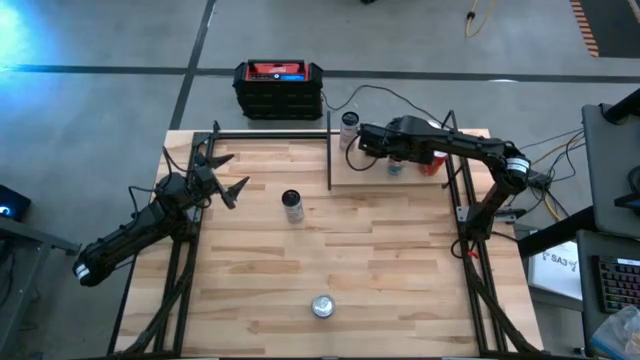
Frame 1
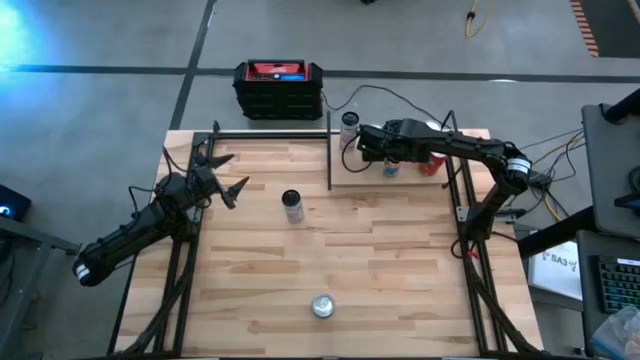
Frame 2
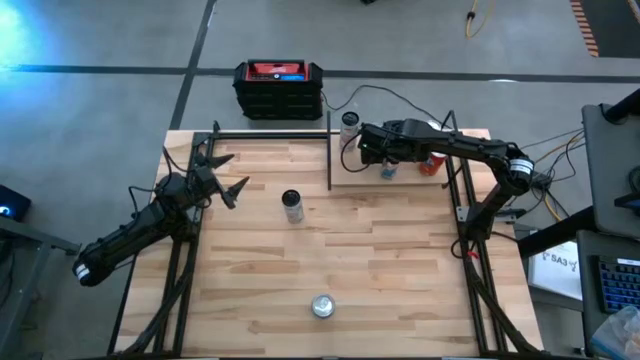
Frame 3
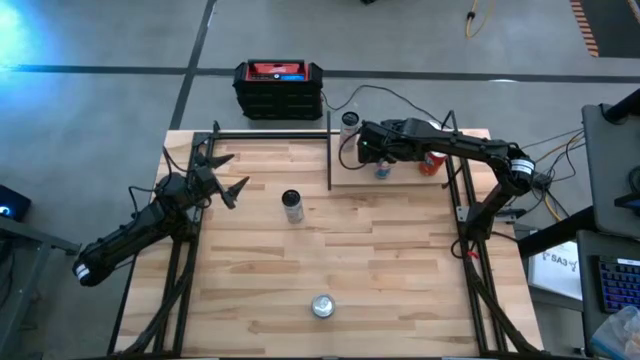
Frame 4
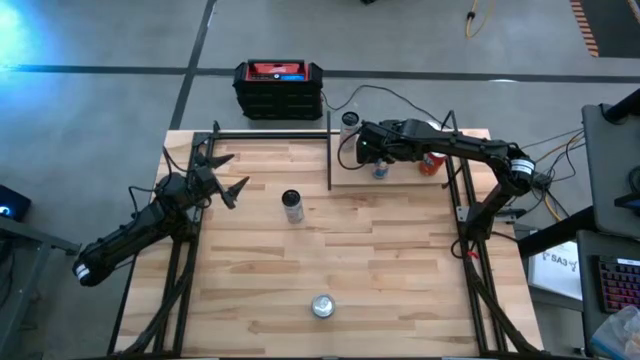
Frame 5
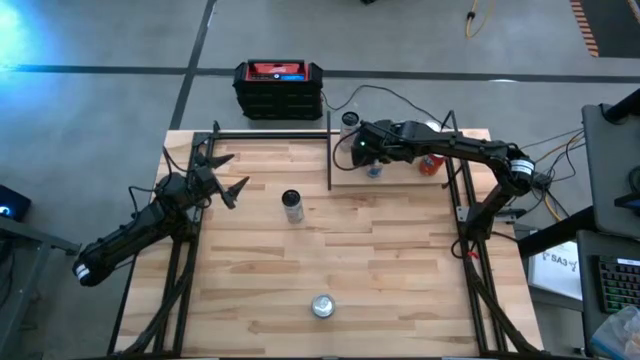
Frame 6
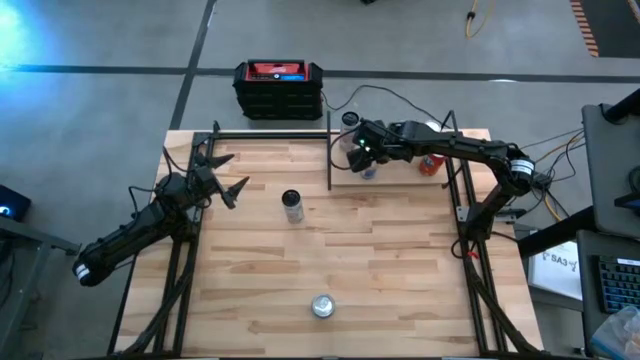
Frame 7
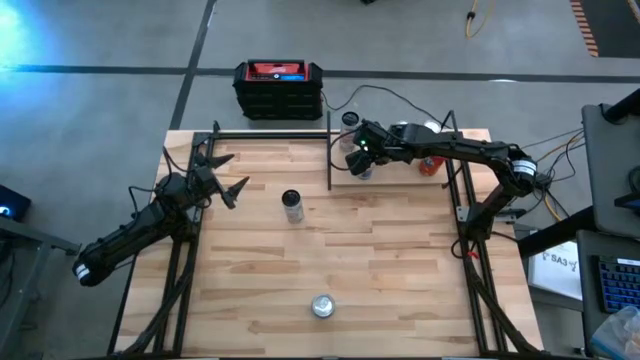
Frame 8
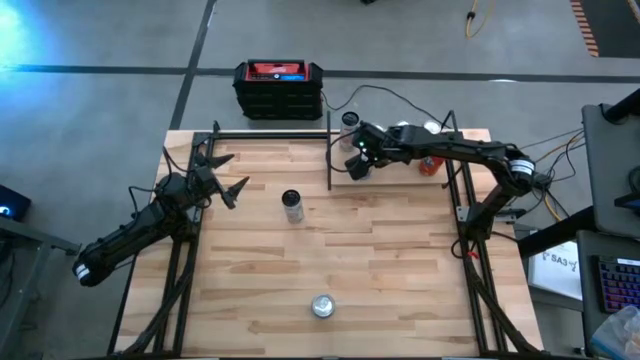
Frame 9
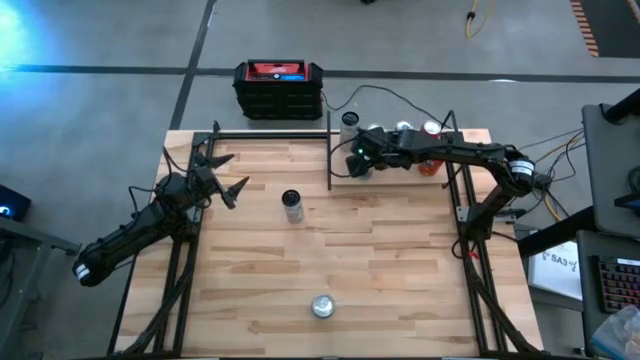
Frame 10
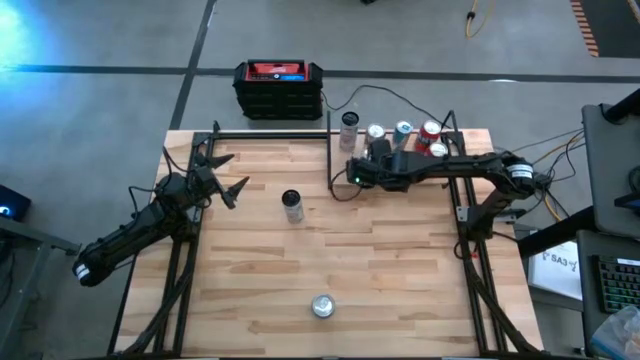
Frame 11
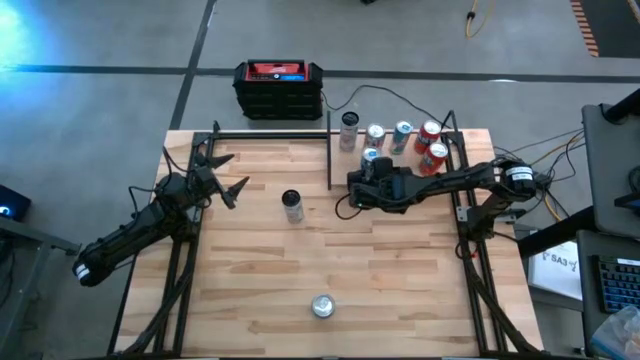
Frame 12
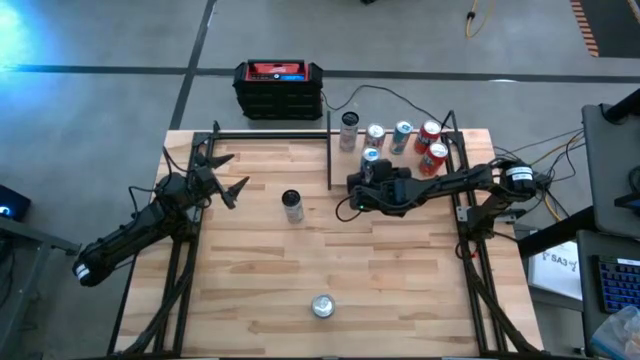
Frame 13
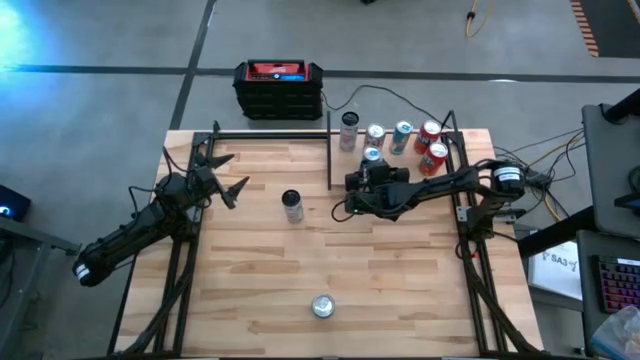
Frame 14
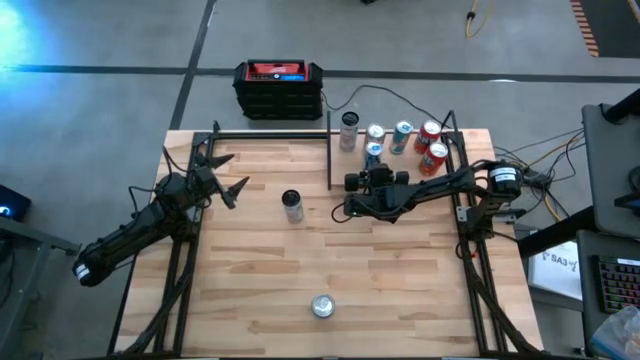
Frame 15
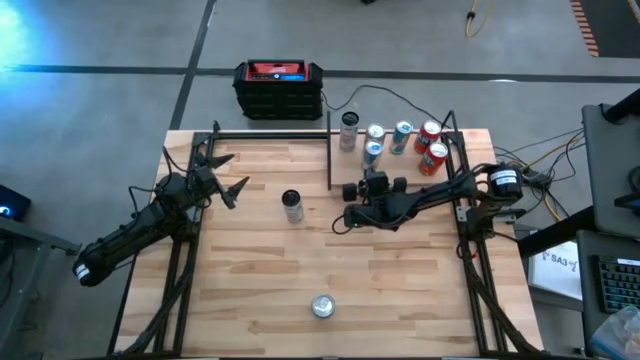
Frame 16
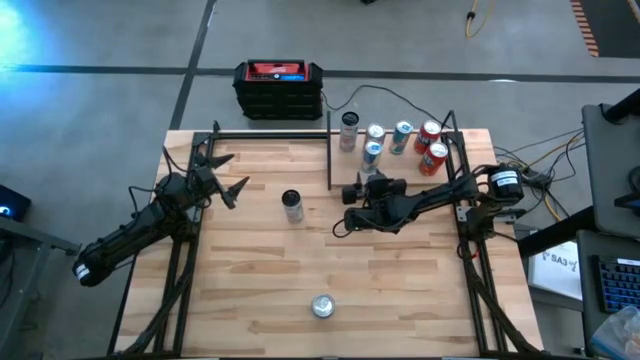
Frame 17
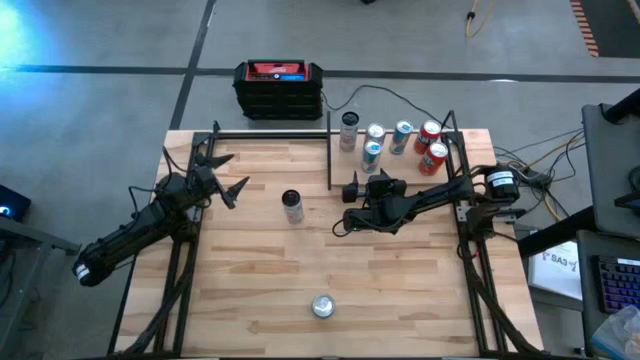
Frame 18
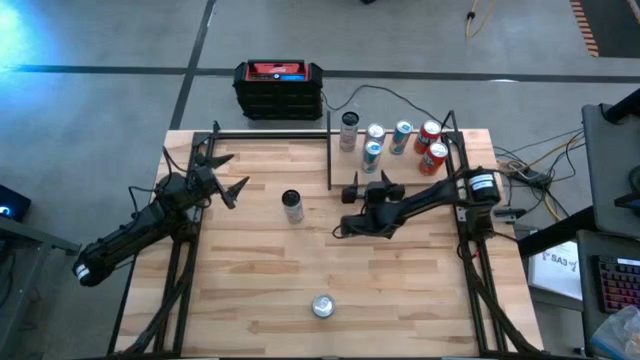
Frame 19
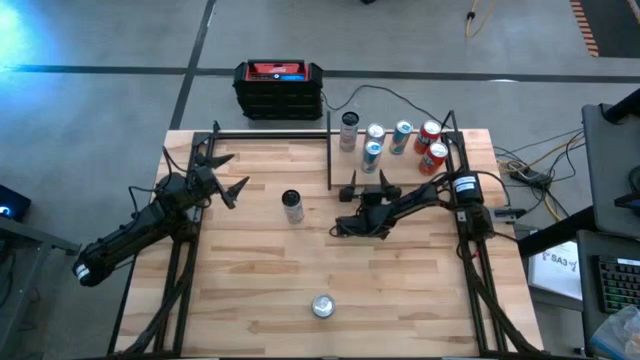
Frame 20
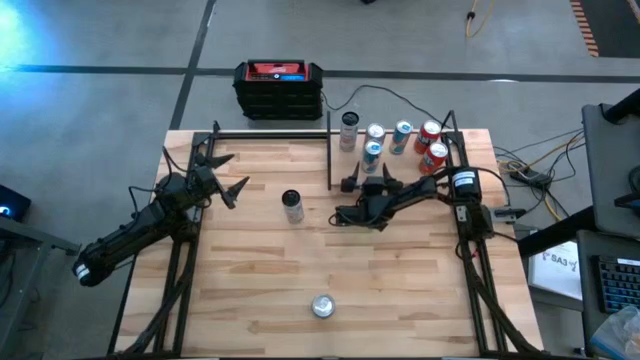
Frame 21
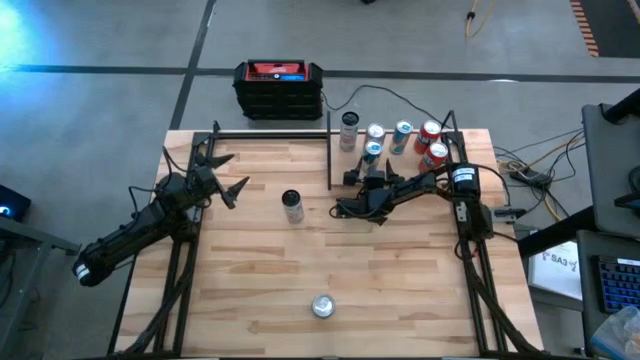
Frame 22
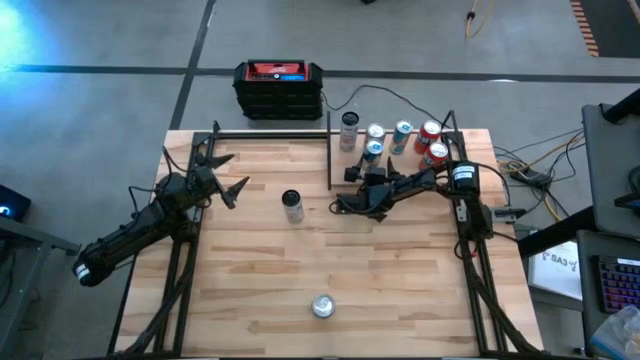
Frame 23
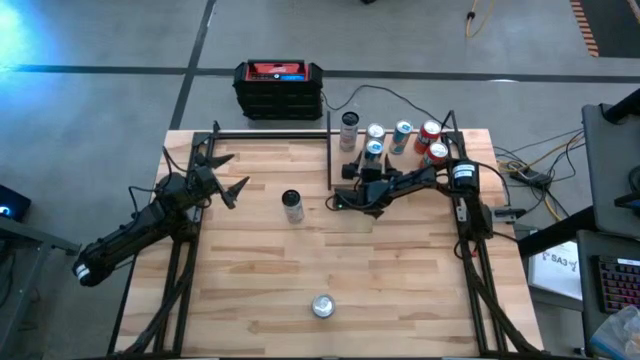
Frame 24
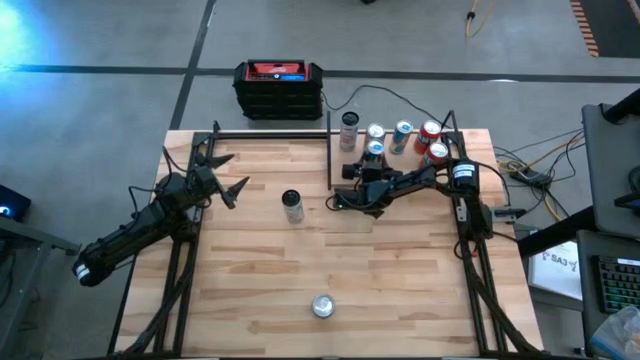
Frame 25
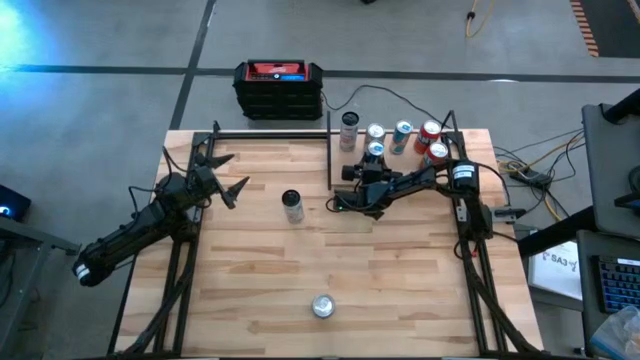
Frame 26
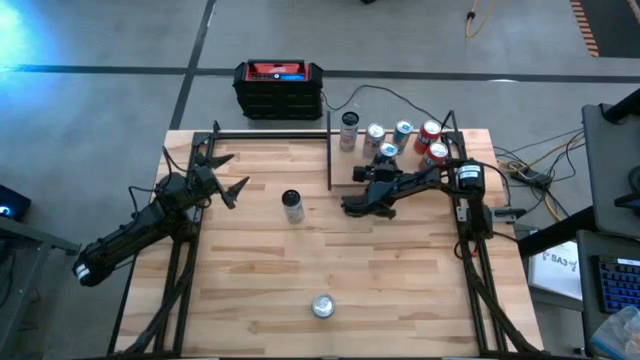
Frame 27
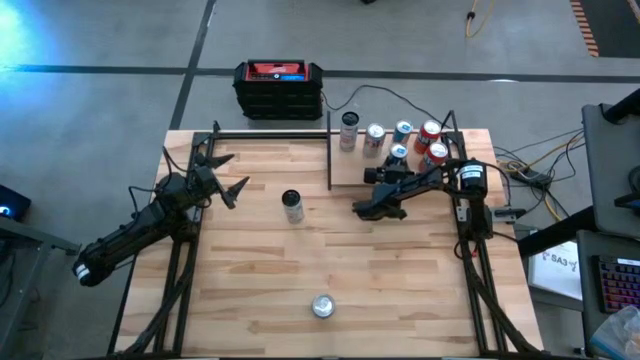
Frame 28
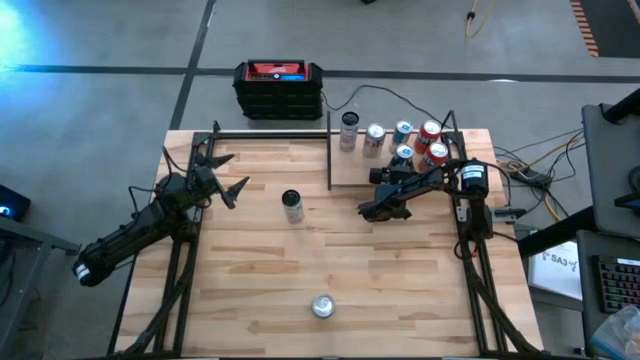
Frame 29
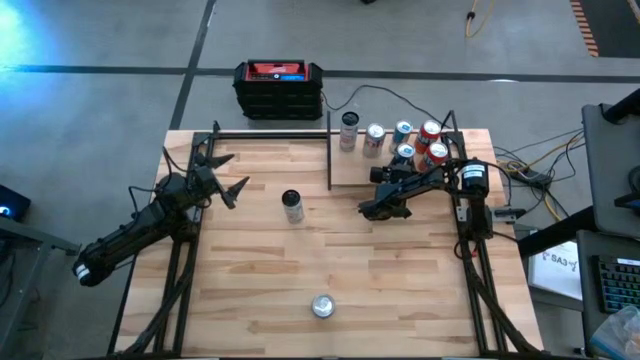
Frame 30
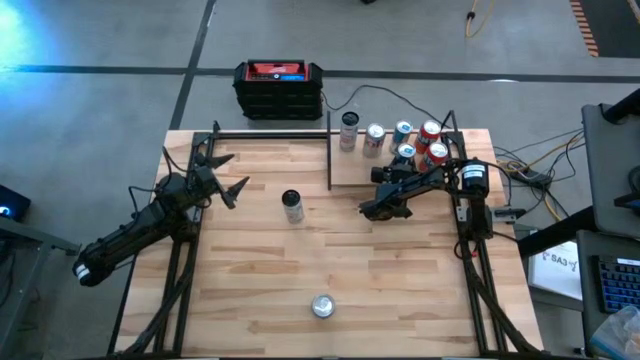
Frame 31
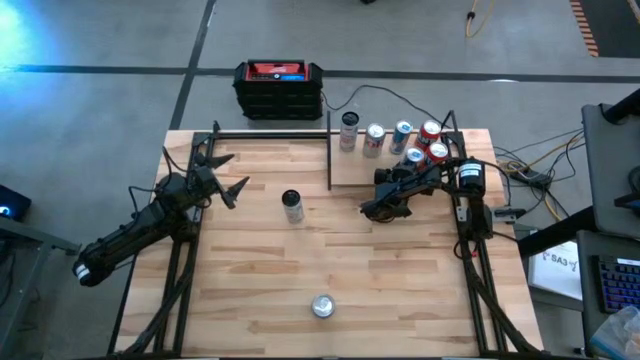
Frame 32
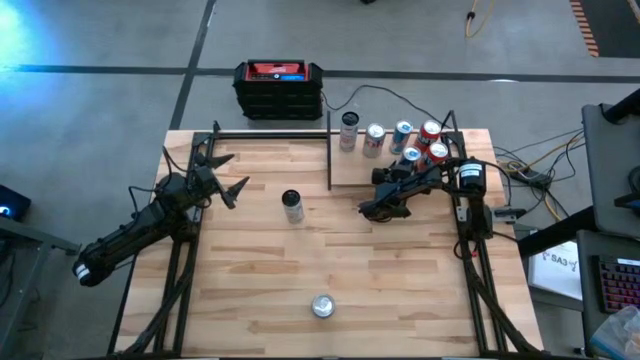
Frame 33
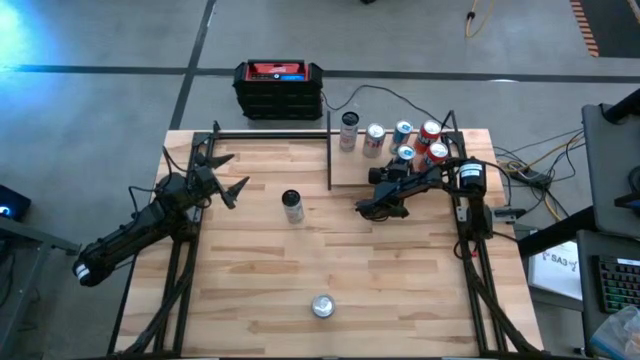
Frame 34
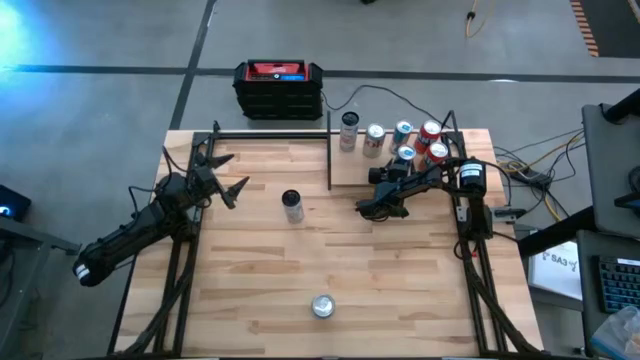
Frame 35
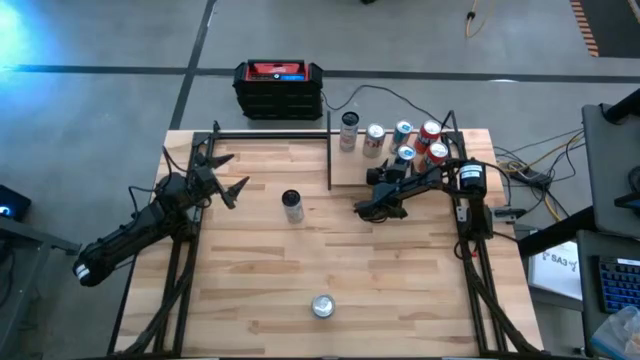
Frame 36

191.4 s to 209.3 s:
Task: Place canned beverage on shelf
Put the blue soda can on the shelf aligned with the other blue soda can

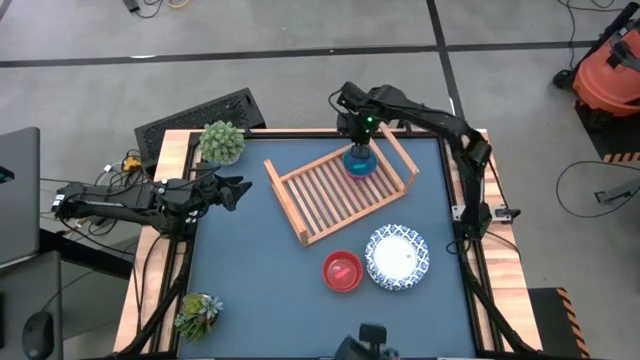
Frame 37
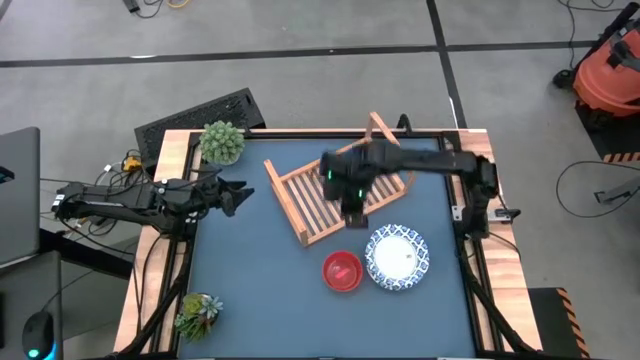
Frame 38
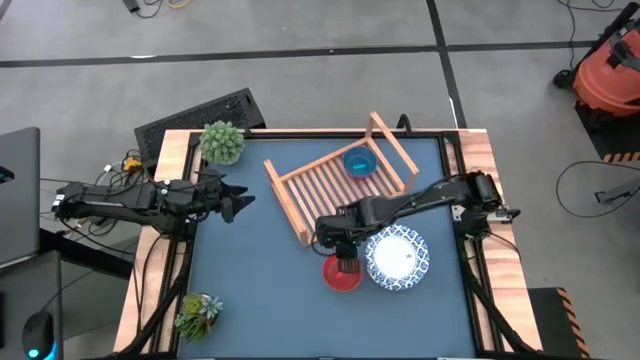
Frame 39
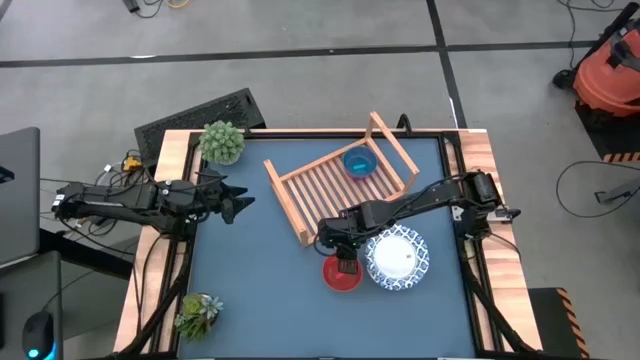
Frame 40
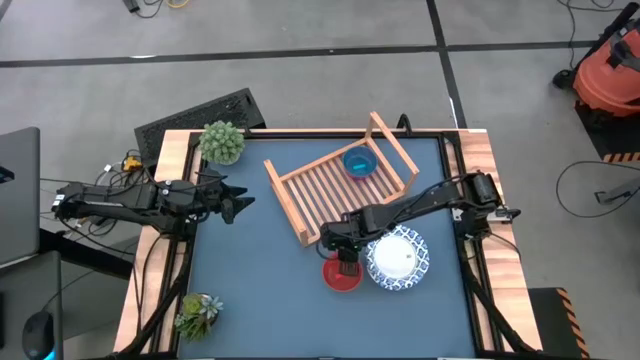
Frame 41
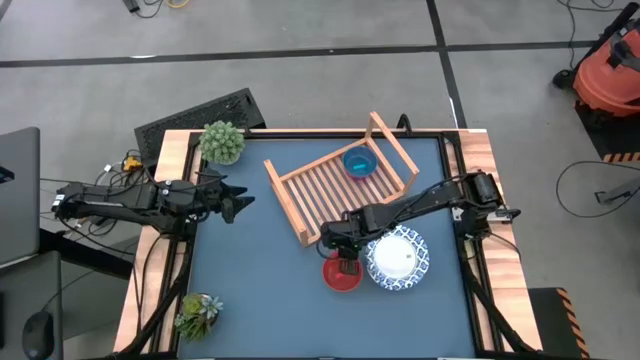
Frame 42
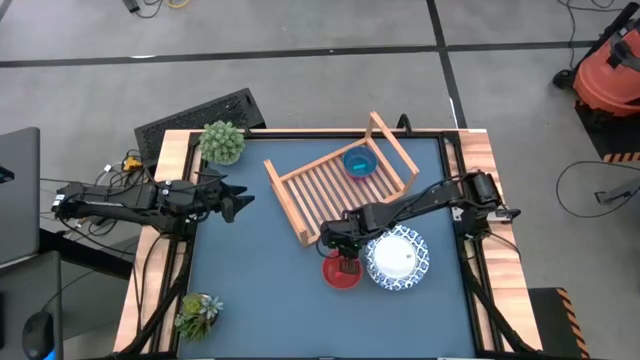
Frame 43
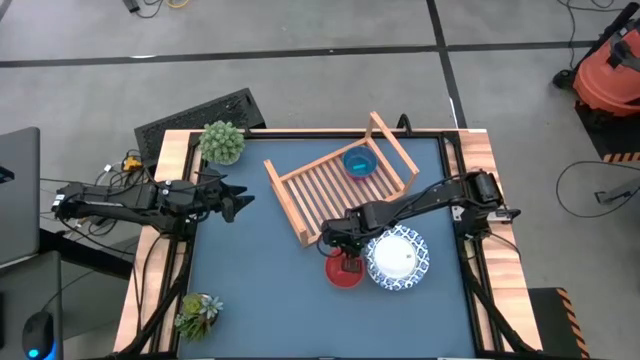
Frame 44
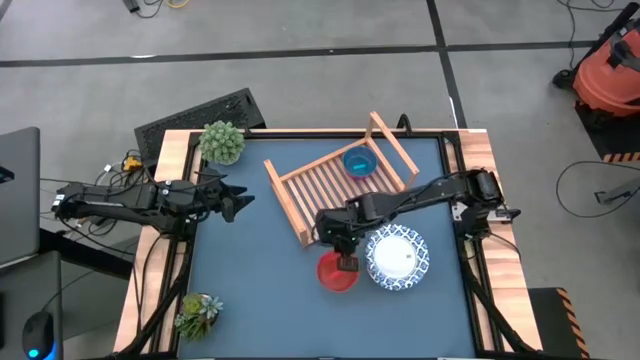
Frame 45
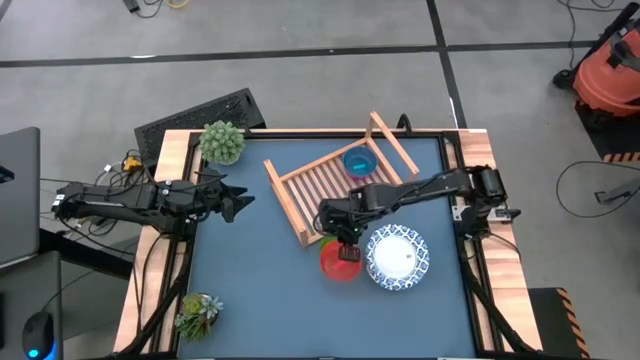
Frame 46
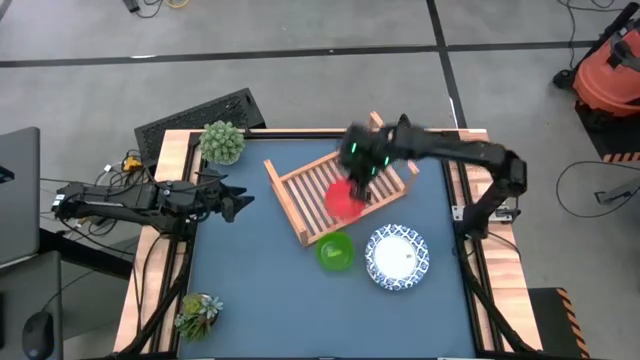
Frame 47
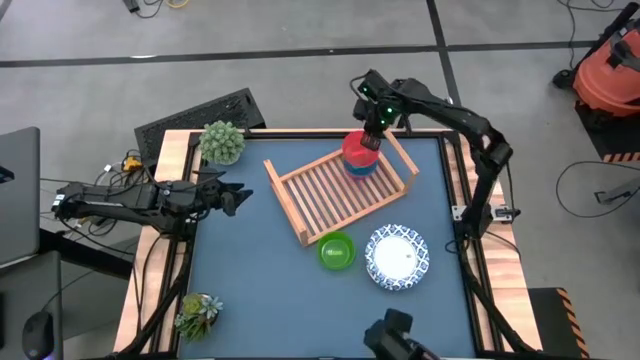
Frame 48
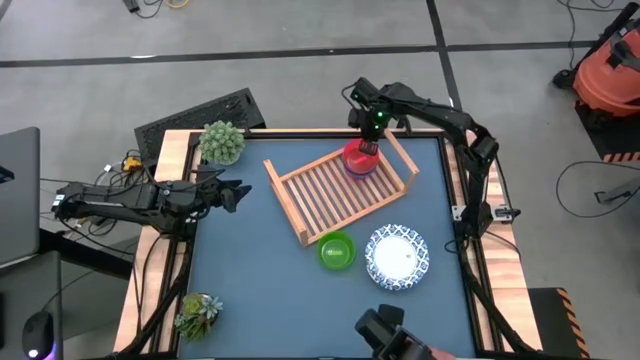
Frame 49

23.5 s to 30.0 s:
Task: Place and stack bowls onto a shelf
Stack the orange bowl on top the blue bowl on the shelf
